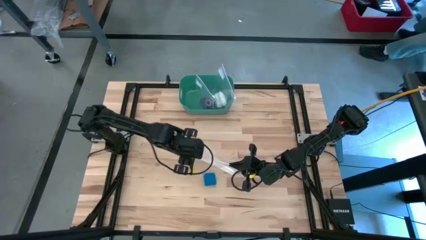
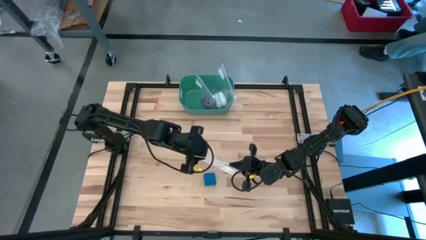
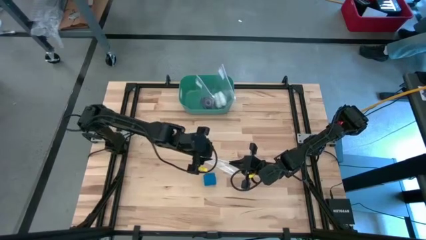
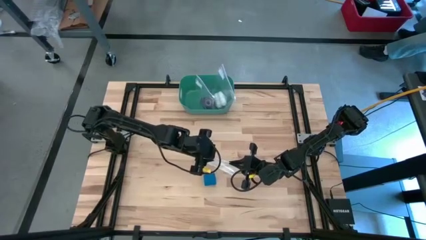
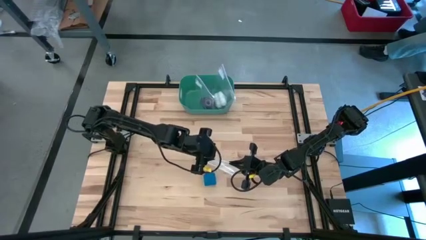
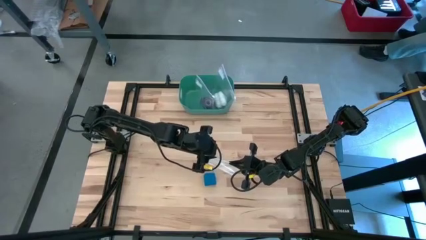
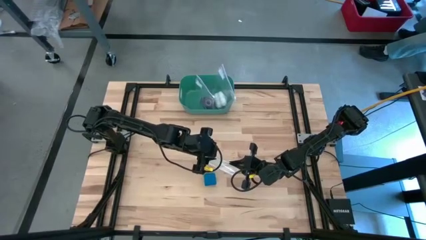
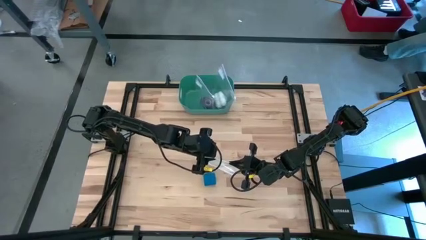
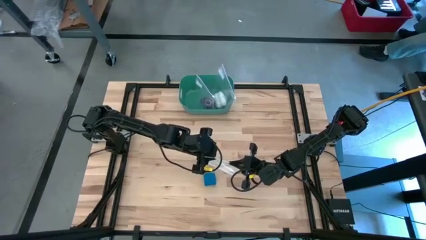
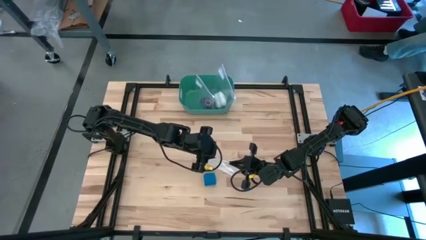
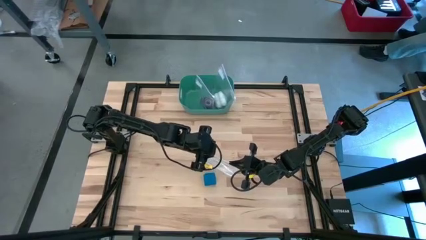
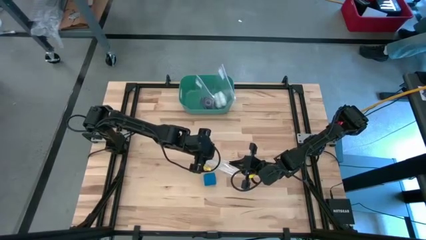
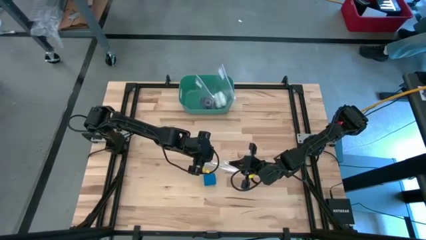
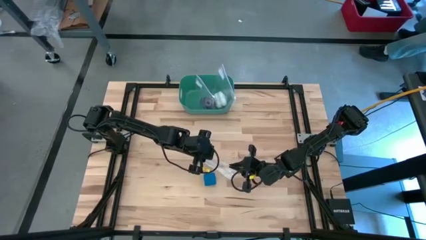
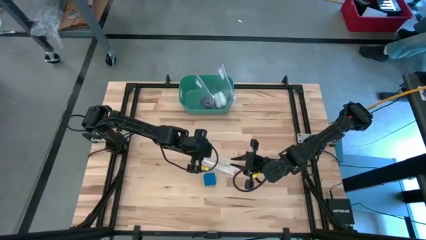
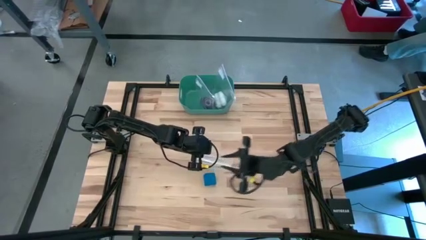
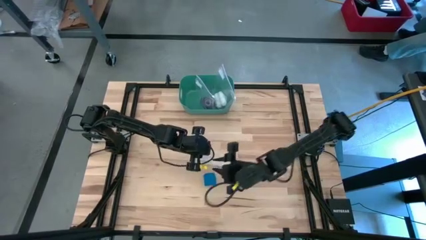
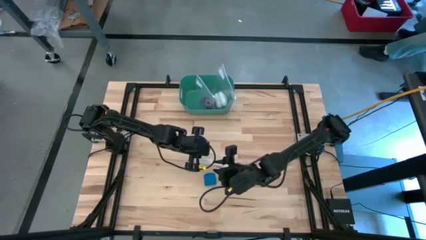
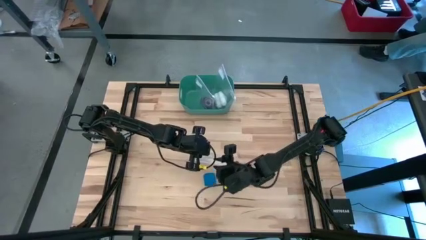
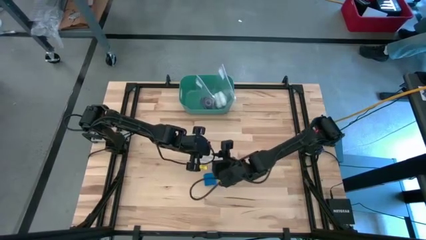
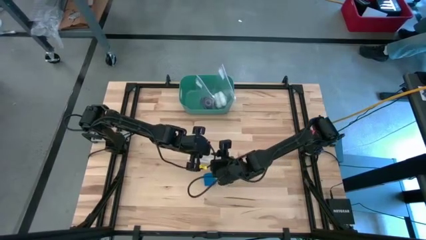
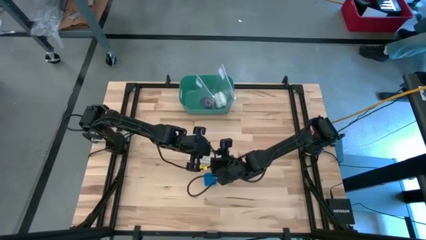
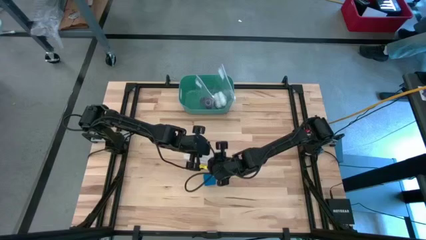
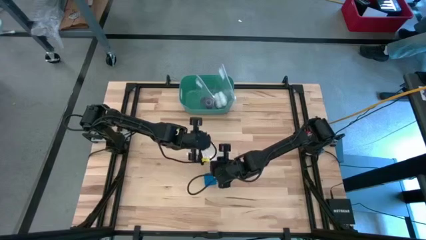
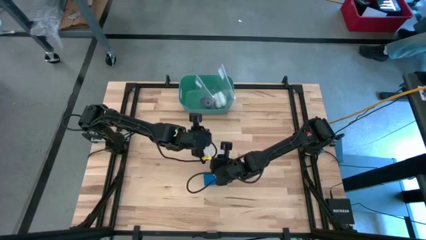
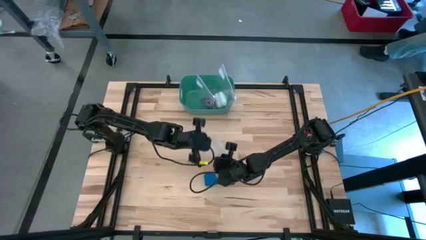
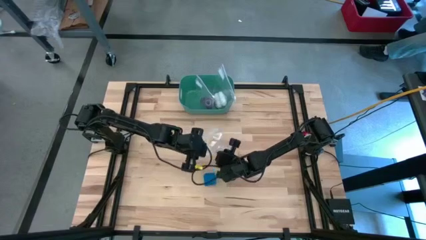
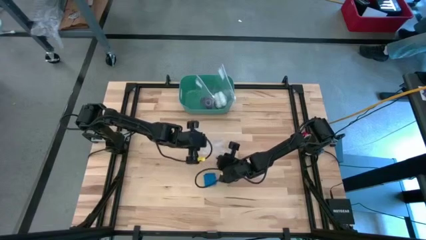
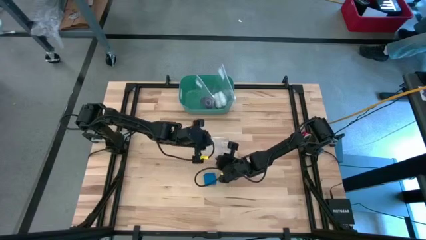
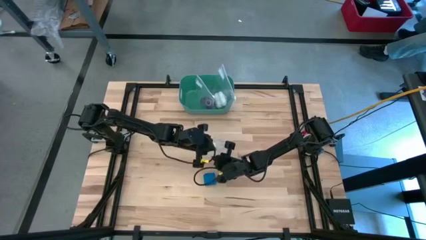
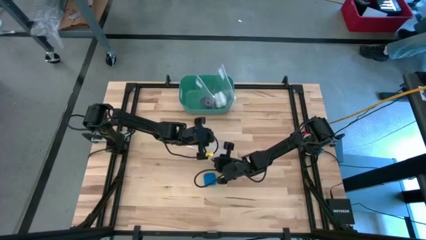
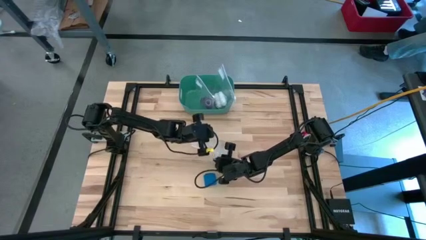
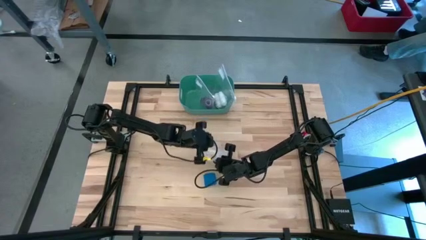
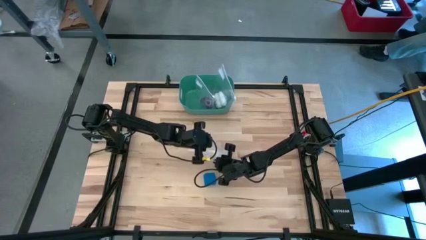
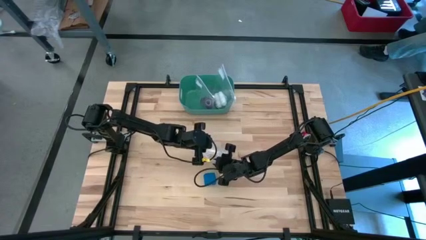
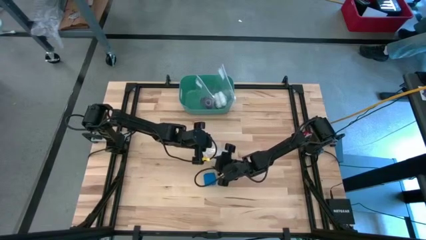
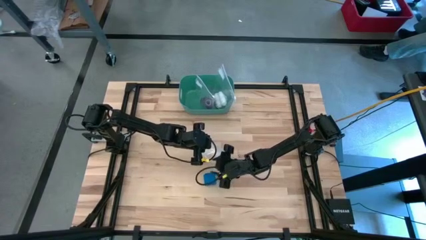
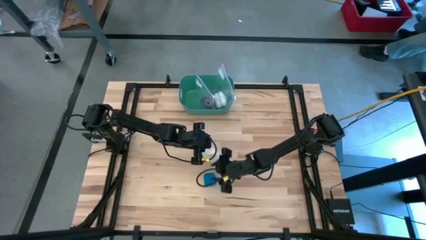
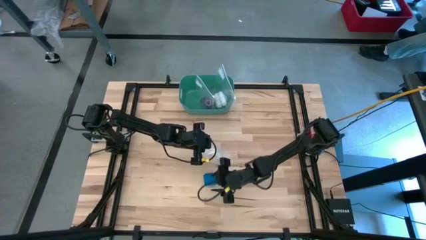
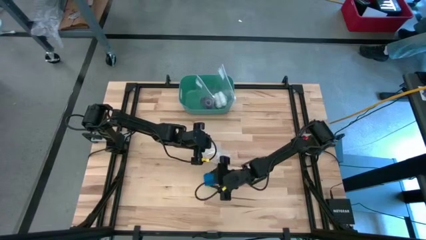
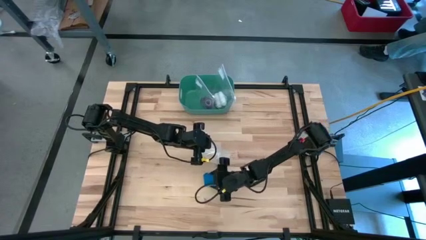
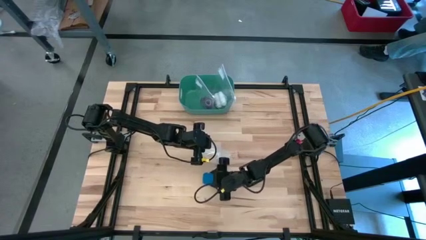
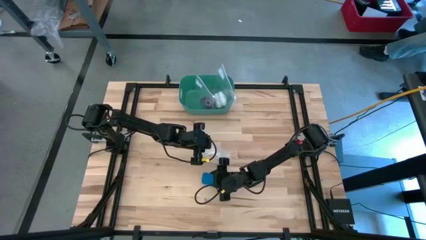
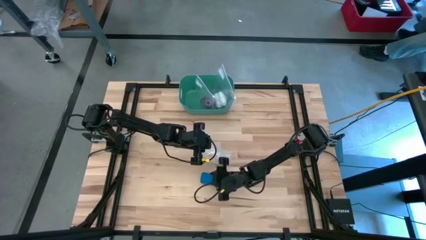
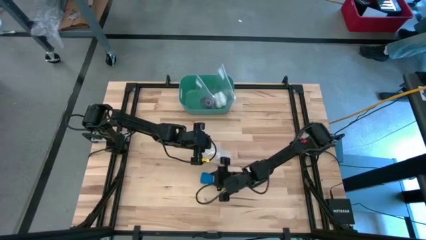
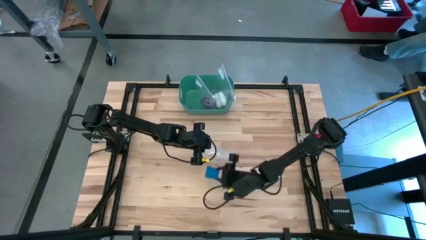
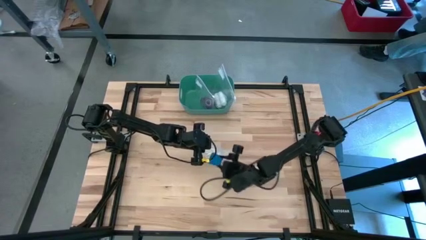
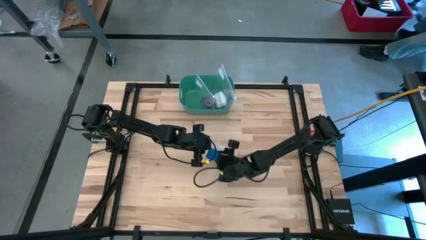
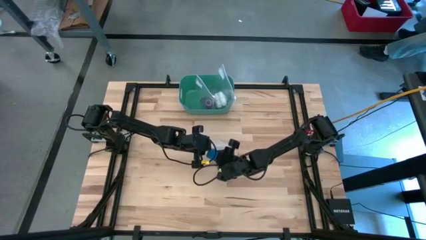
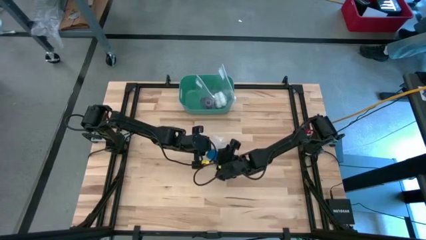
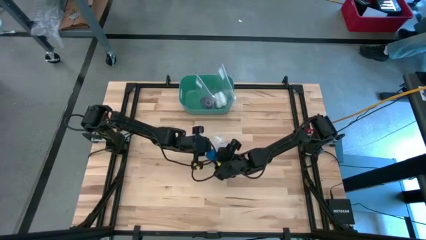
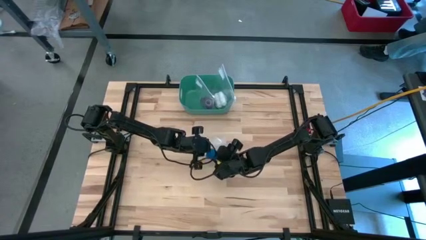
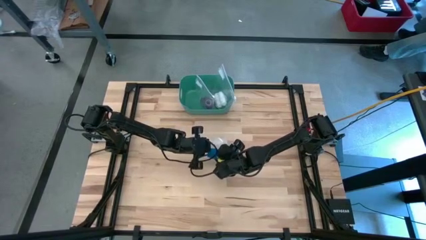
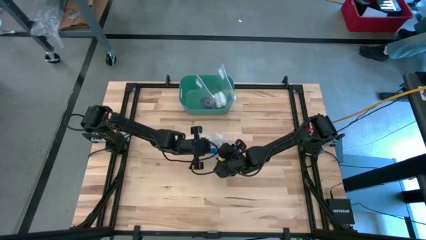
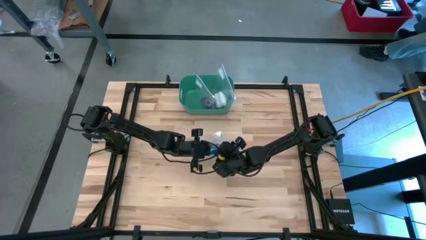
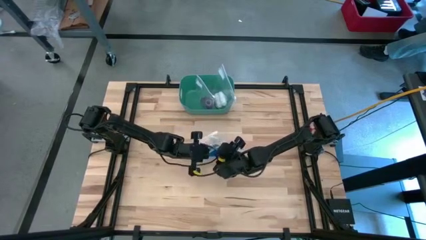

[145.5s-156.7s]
Task: Roll bandage
Put the blue bandage into the transparent zip bag
